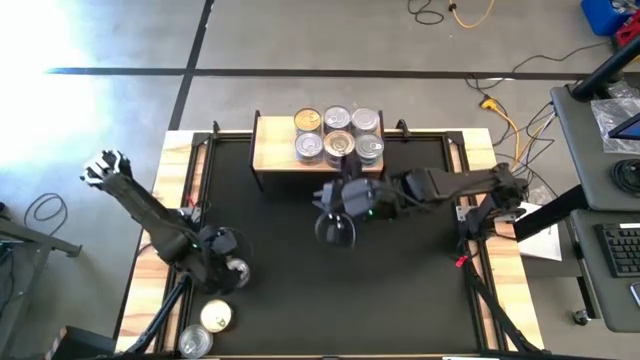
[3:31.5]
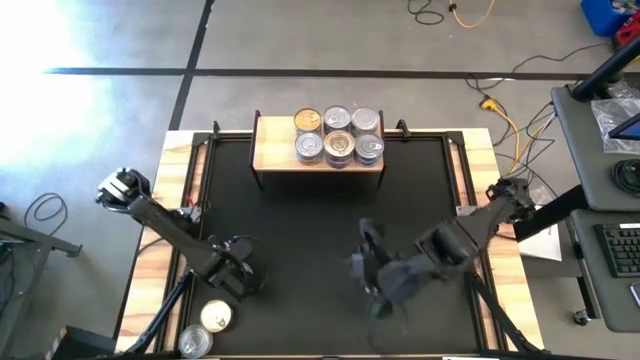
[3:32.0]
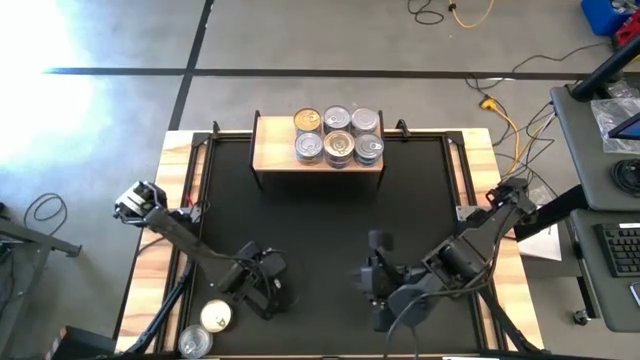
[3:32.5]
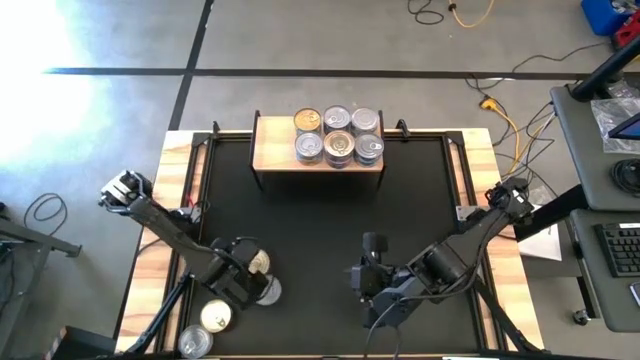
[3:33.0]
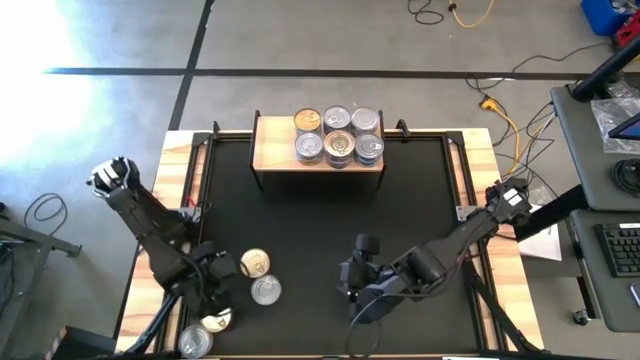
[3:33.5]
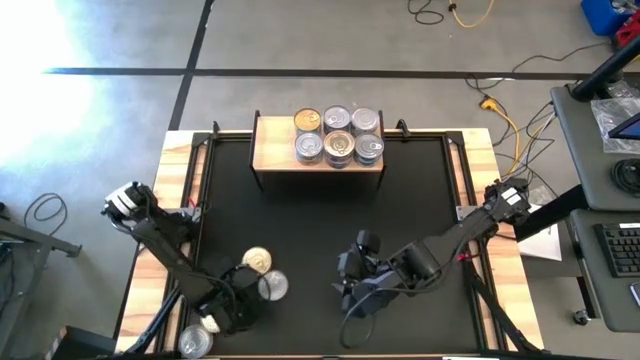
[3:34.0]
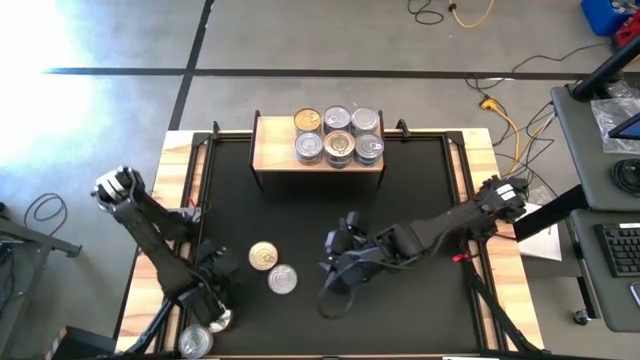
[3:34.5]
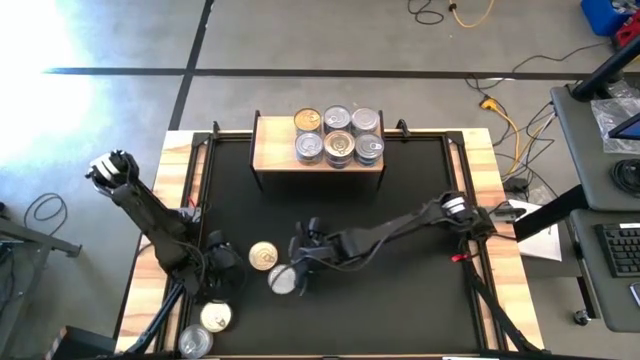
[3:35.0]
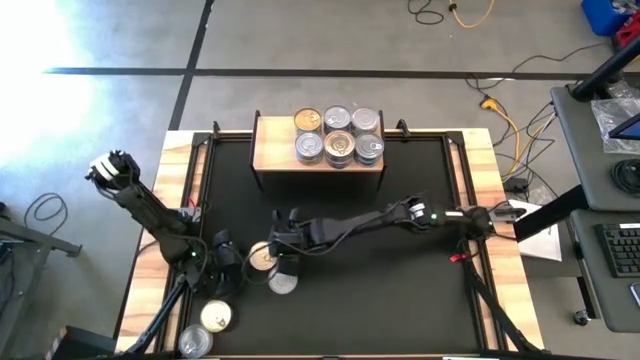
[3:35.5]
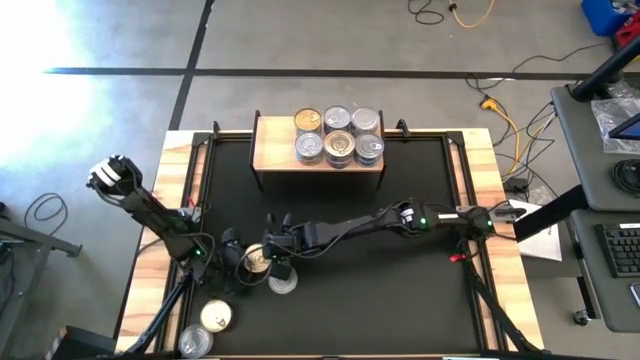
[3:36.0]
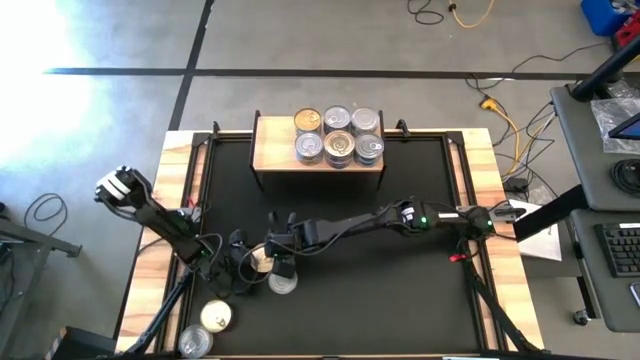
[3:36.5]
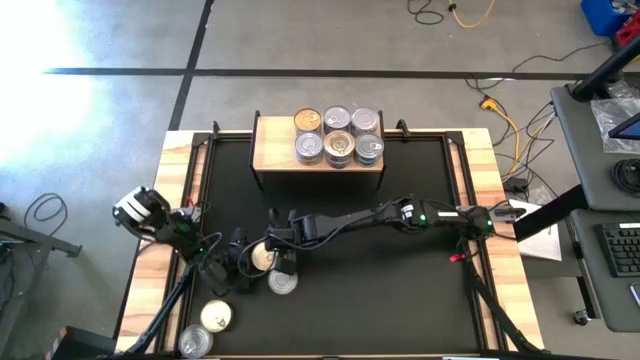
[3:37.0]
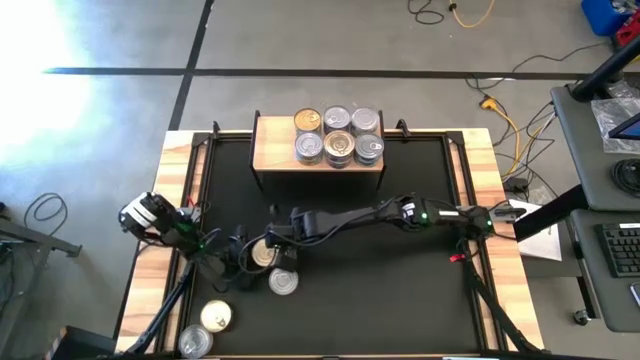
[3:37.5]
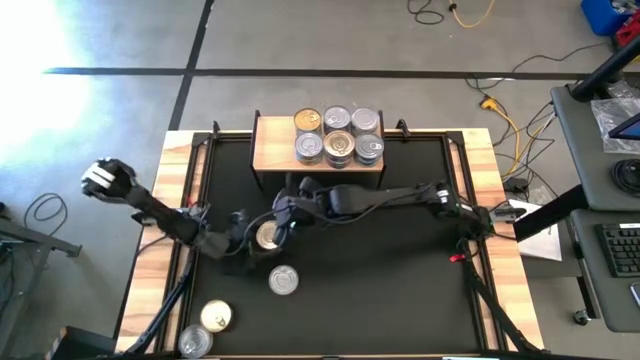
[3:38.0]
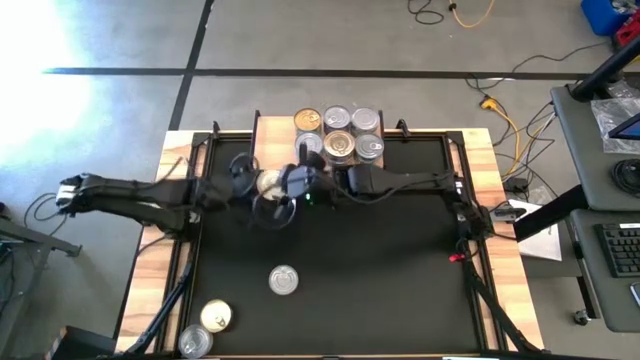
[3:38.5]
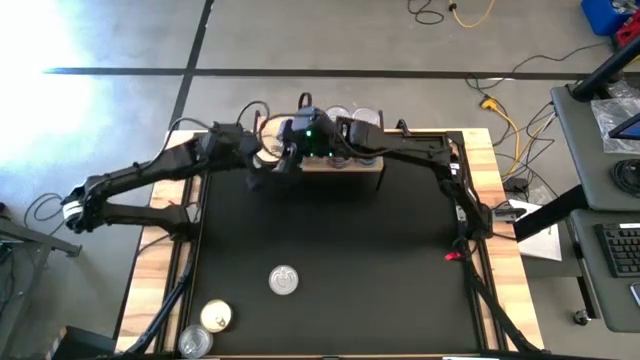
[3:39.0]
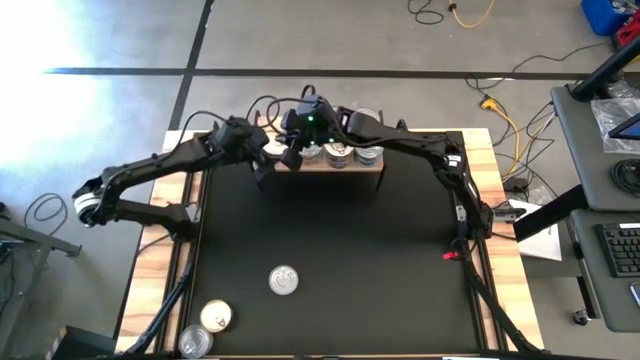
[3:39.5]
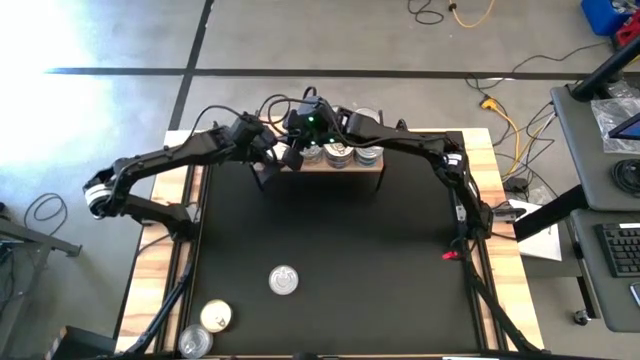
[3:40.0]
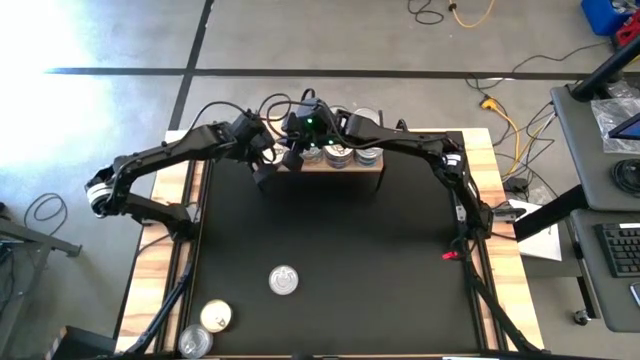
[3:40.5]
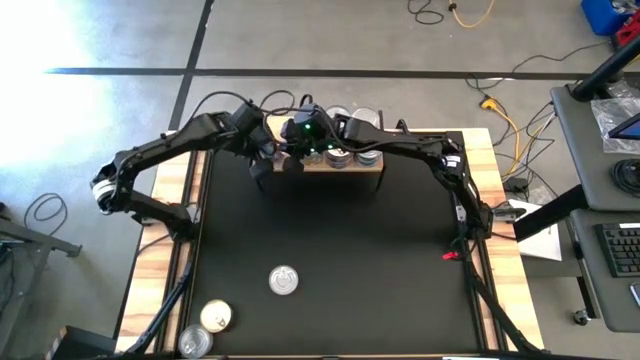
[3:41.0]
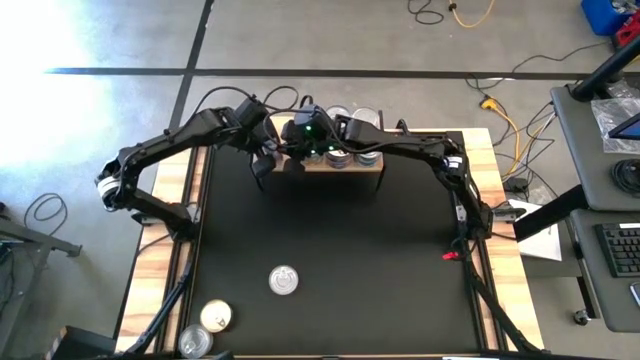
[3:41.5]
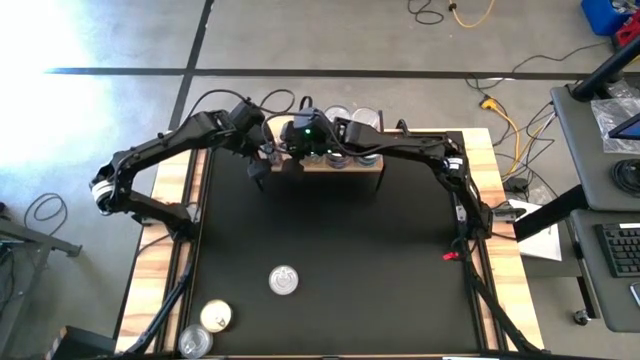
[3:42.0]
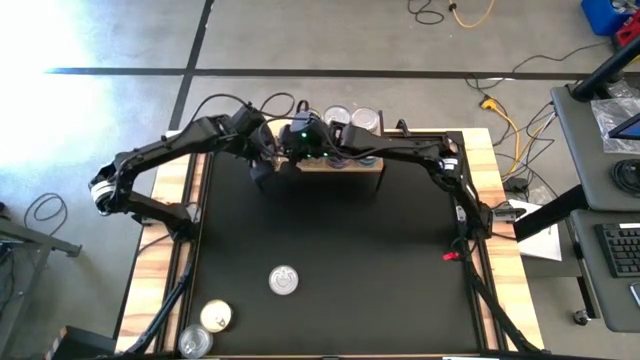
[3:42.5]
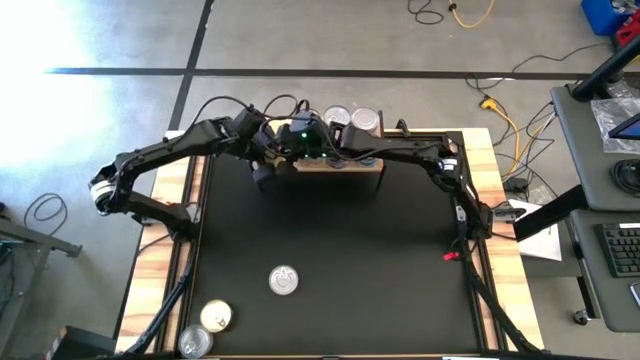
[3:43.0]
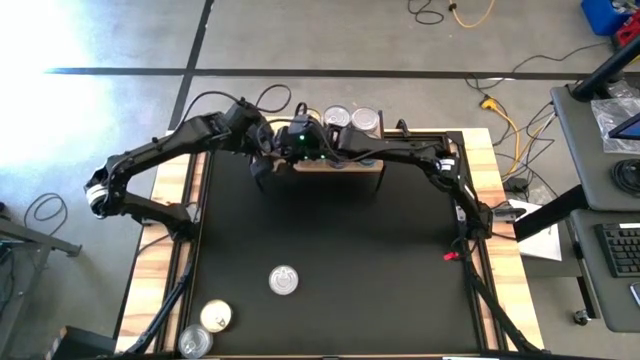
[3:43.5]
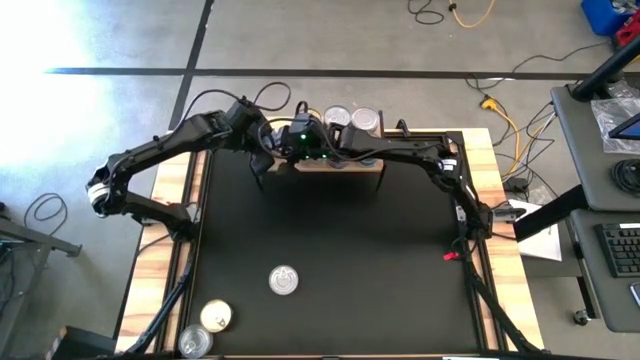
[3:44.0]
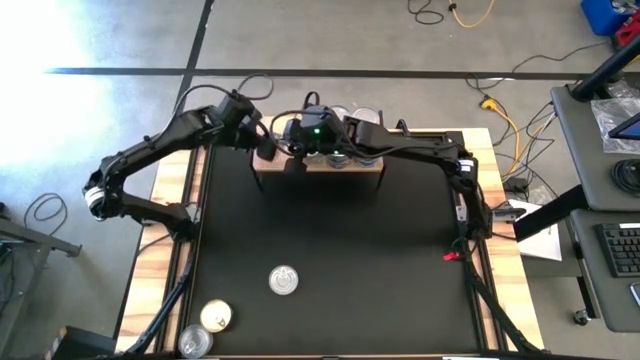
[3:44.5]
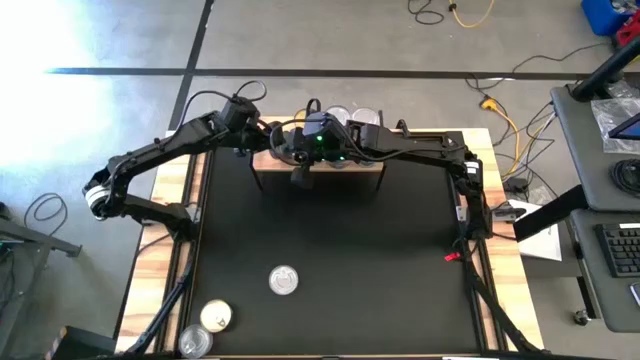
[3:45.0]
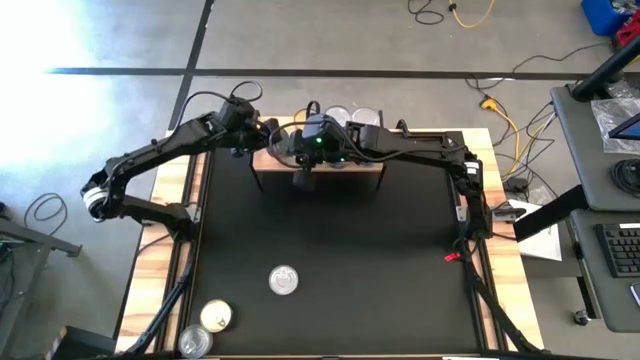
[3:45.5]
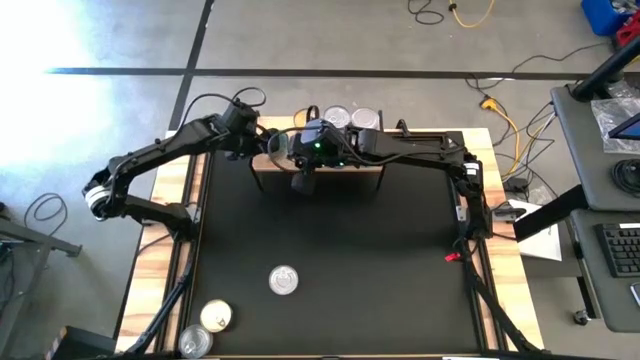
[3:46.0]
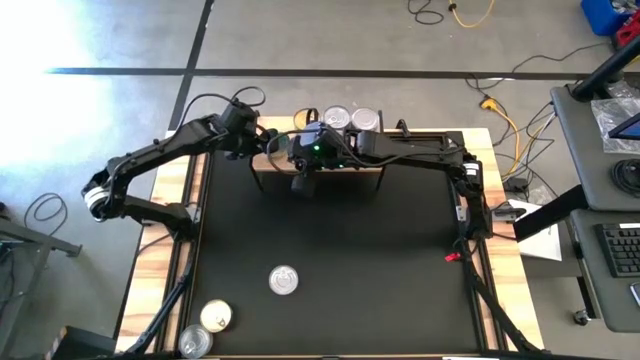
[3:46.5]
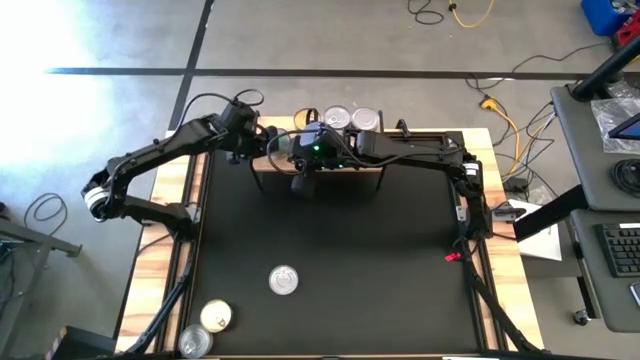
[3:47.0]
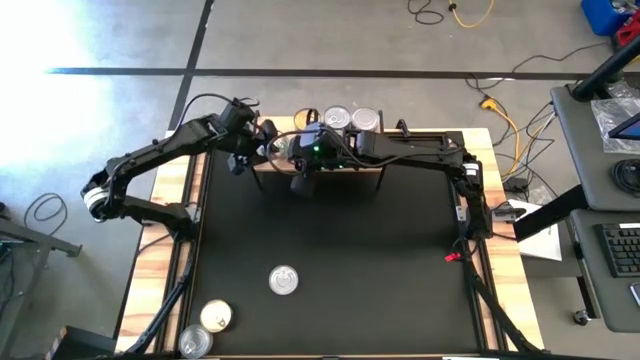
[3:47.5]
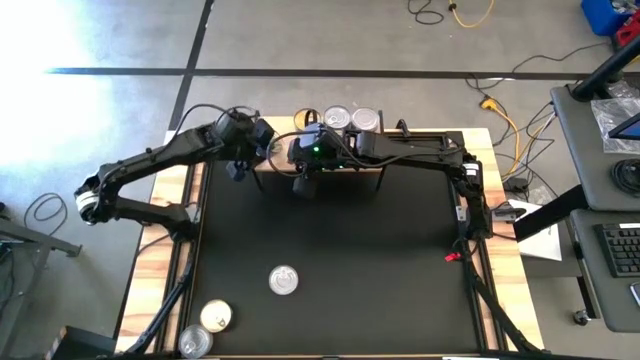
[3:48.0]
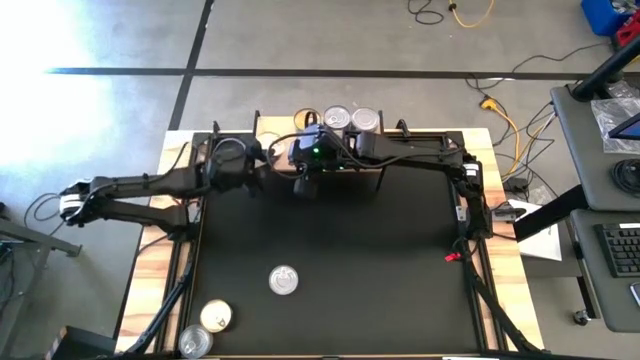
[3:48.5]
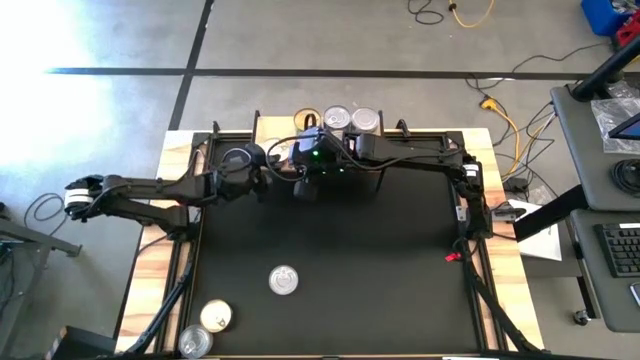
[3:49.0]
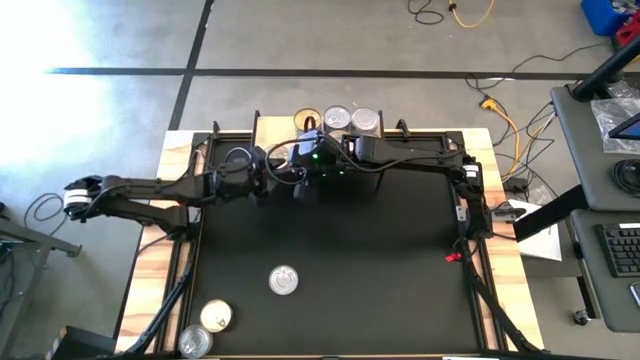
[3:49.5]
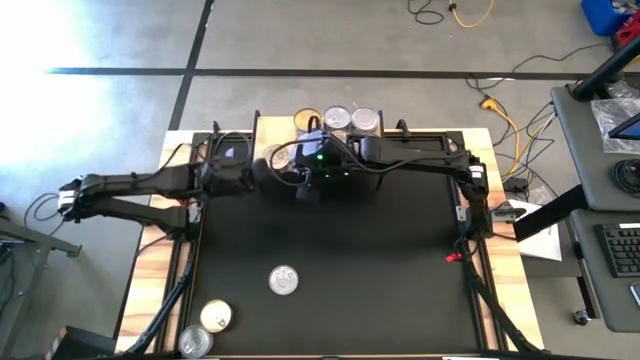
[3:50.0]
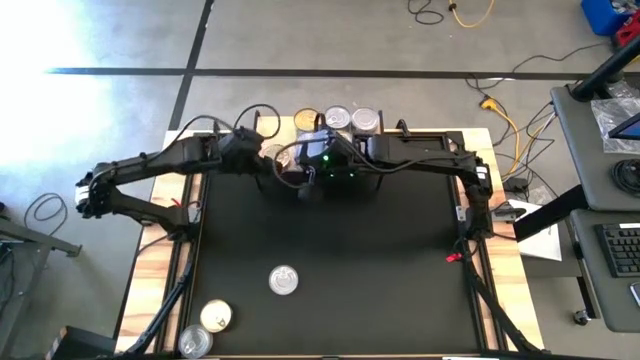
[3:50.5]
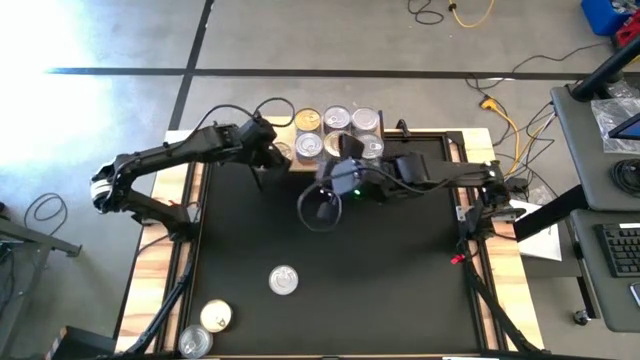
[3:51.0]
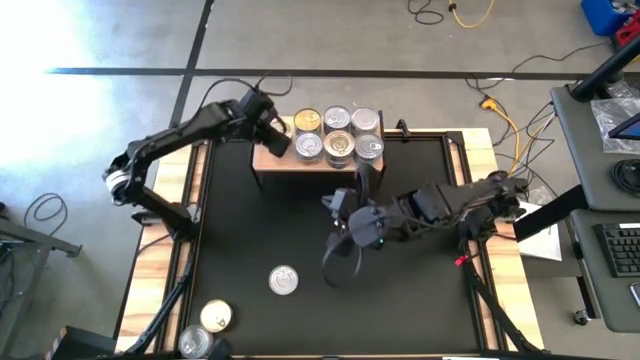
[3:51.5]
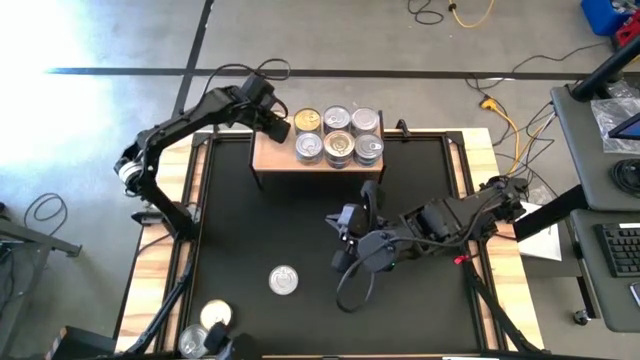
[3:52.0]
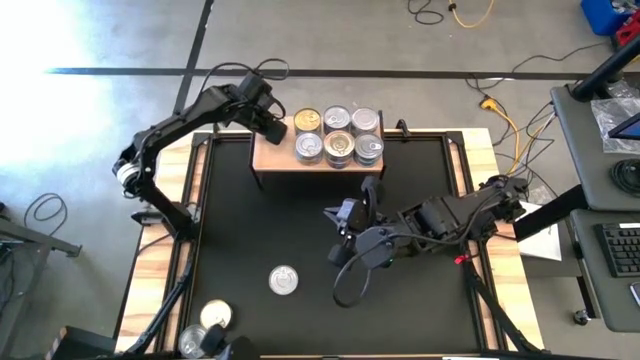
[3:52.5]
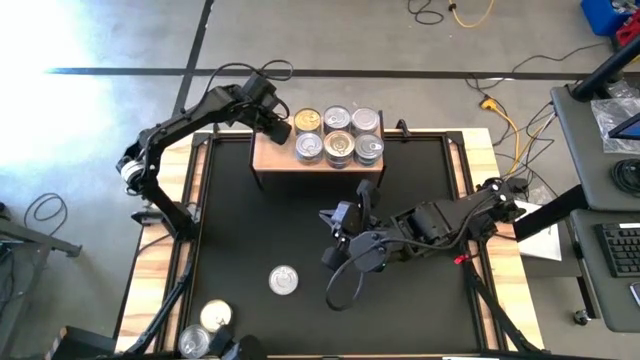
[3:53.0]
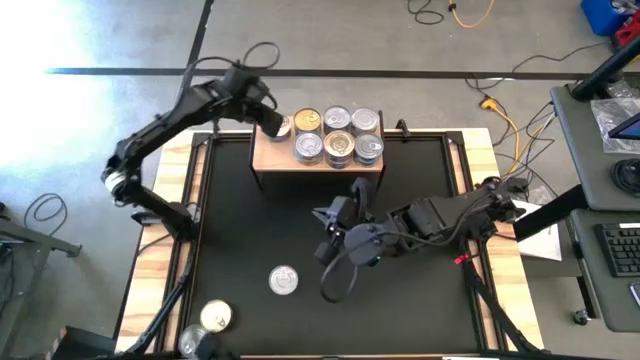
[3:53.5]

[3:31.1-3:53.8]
Task: Stack canned seafood by type on shelf
Put the top pink tuna can on the shelf
